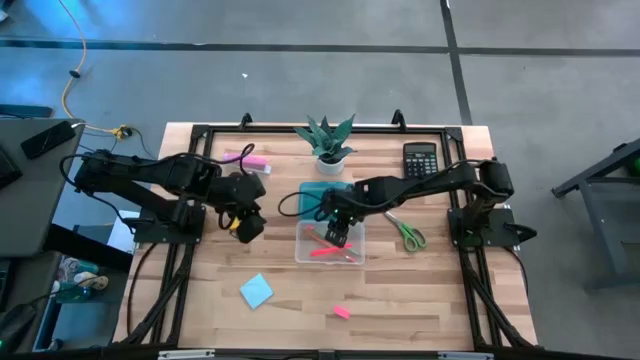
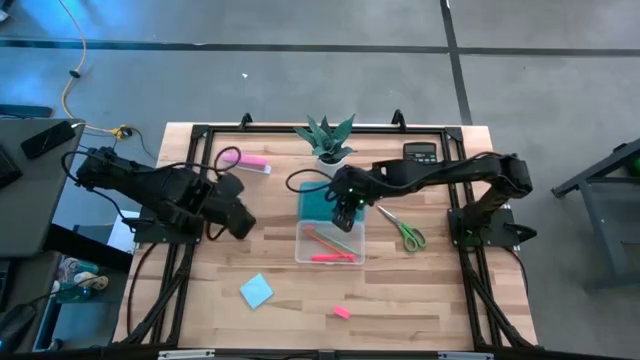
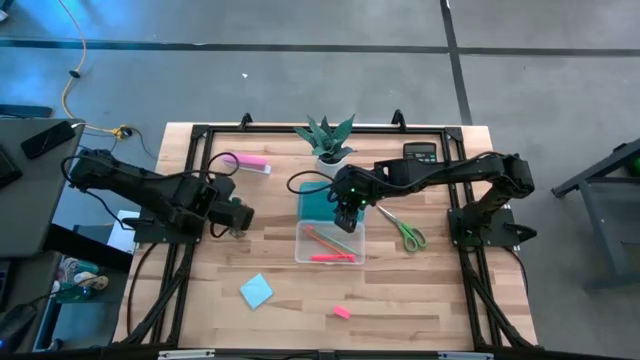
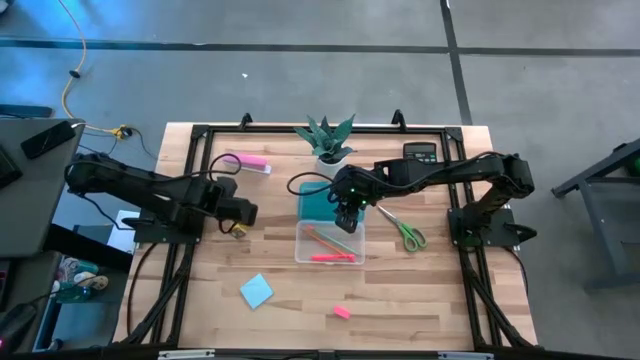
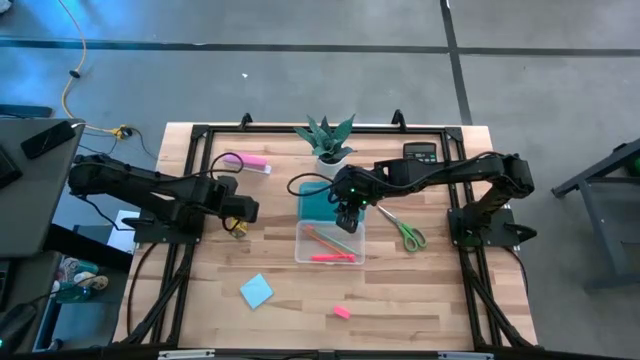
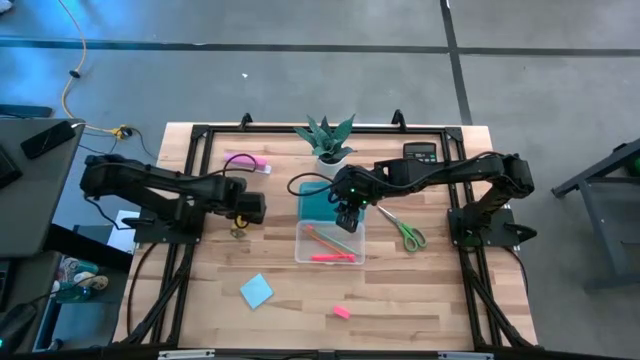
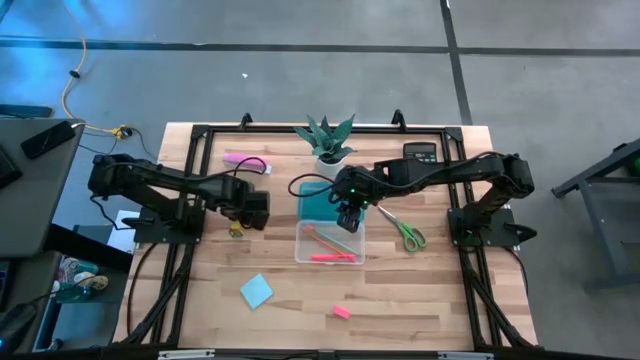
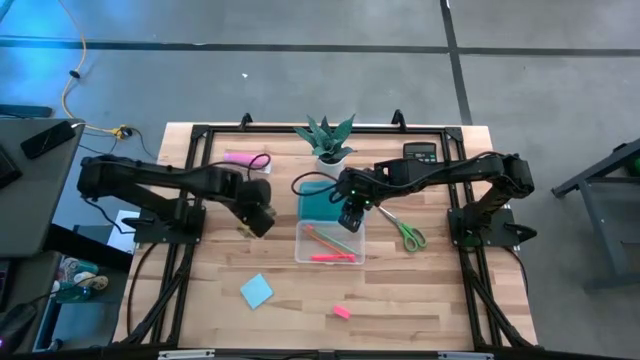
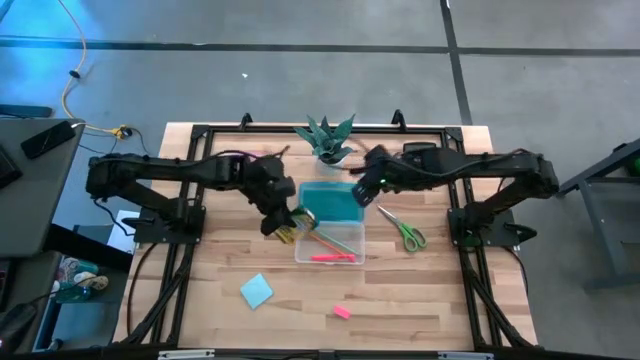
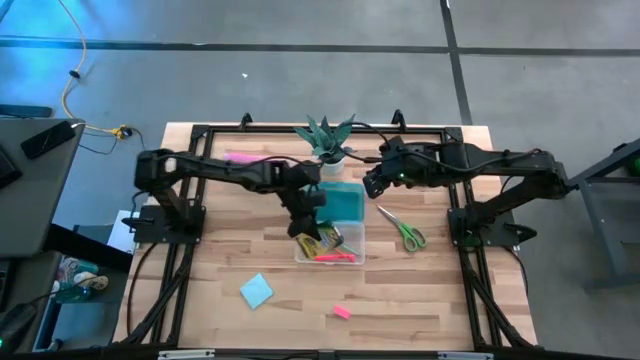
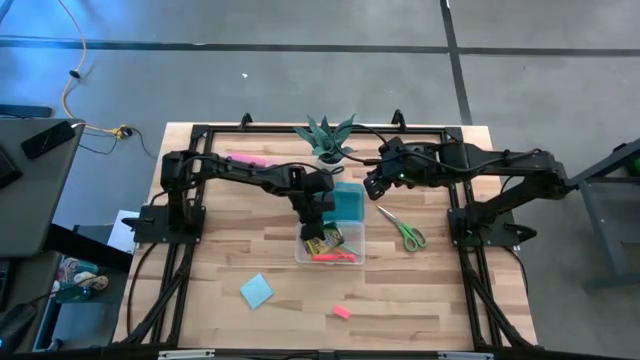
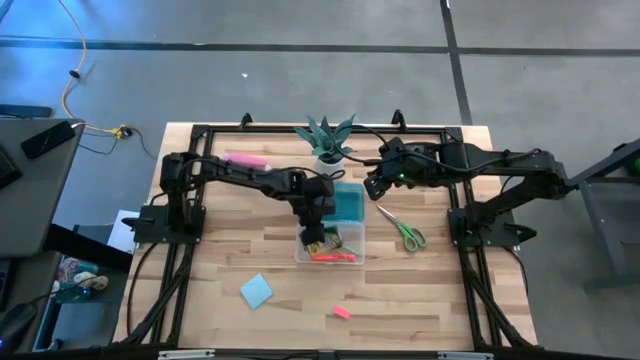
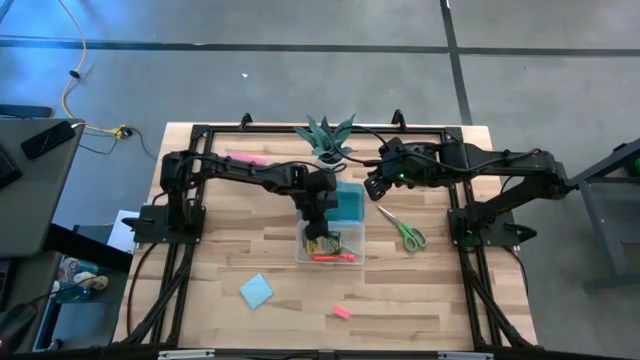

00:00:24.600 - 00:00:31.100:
Task: Pack school essentials
Put the yellow crayon box into the supply box

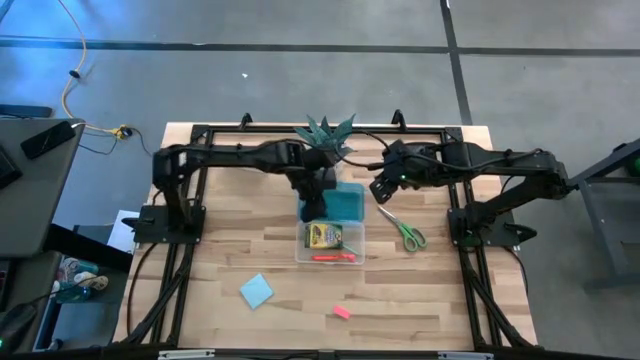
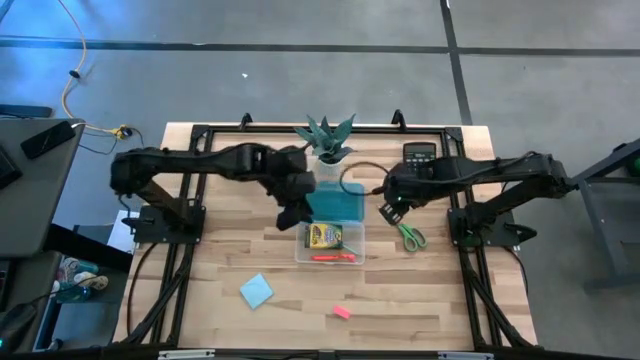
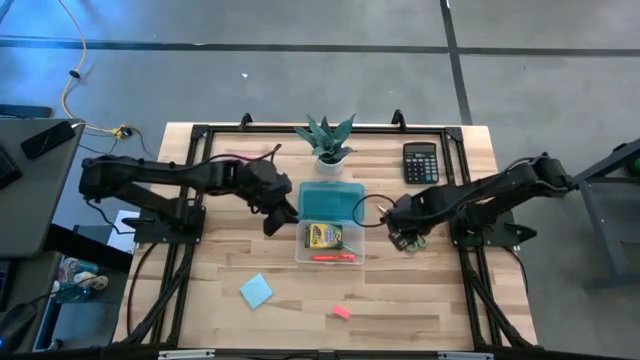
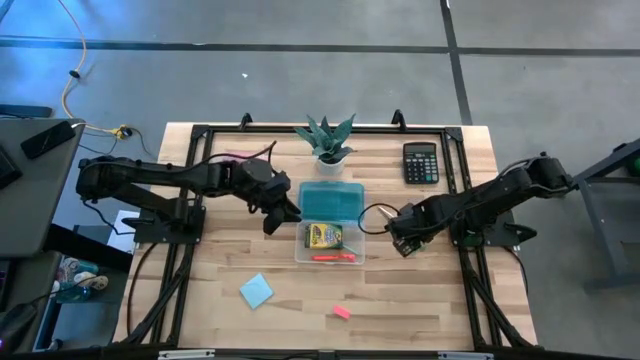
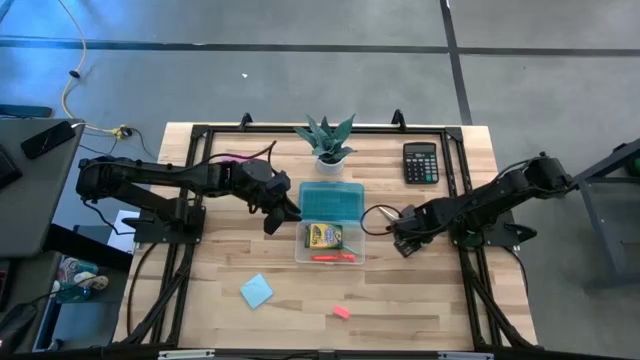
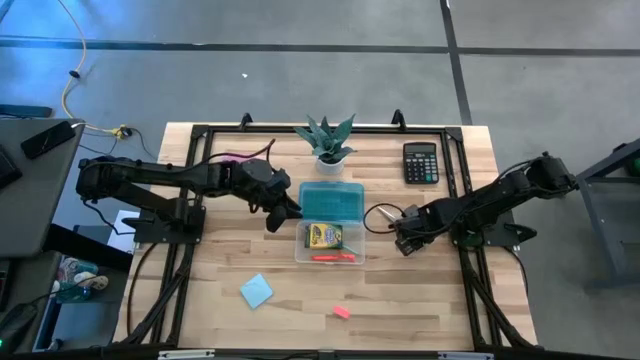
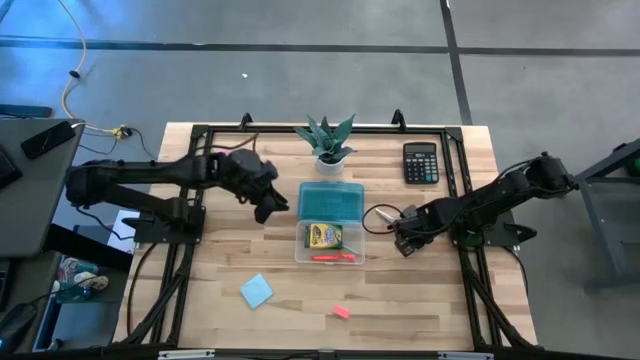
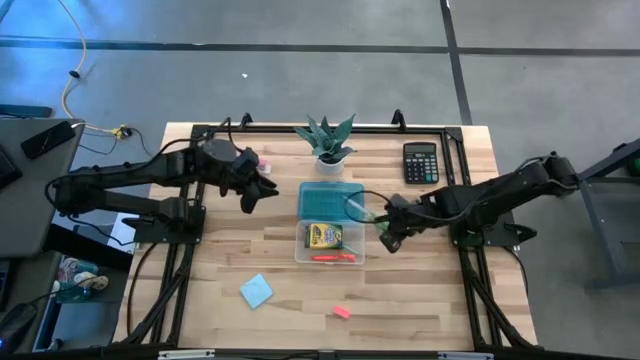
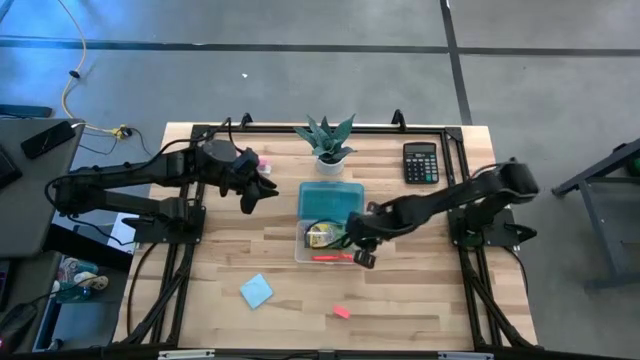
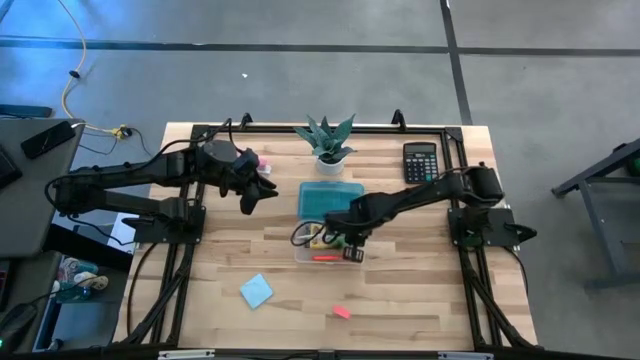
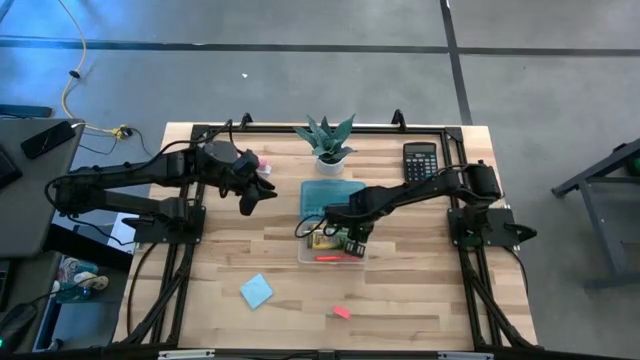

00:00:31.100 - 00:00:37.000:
Put the green scissors into the supply box

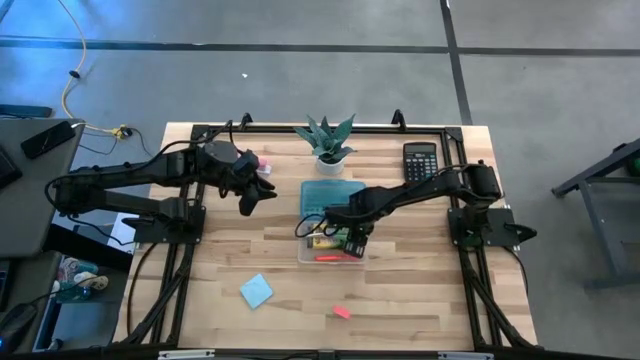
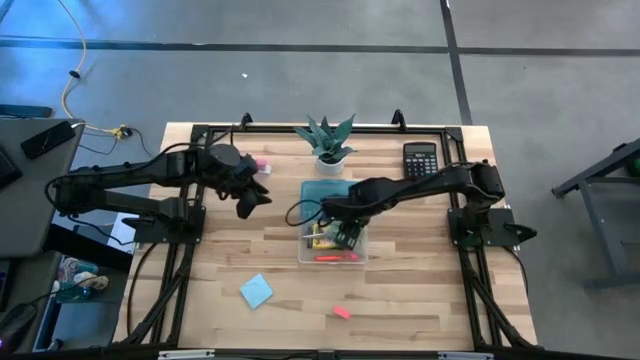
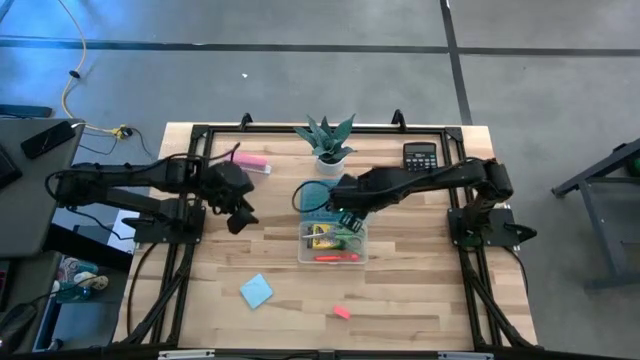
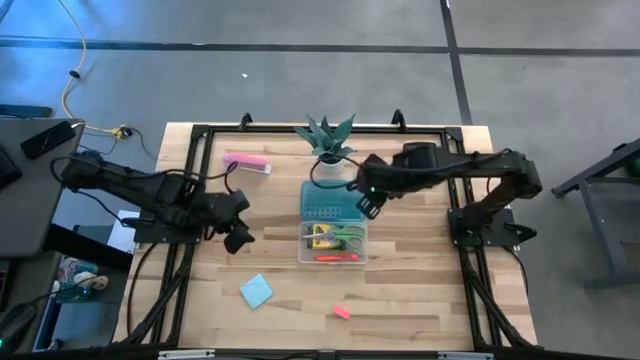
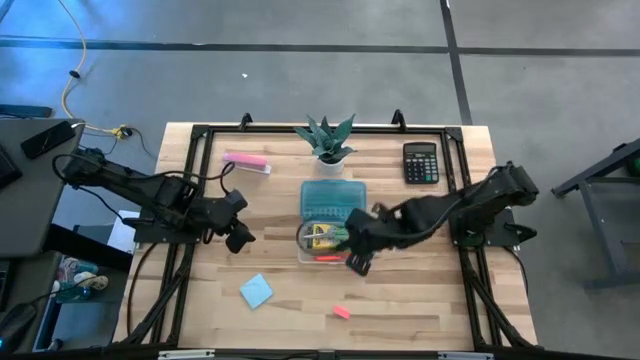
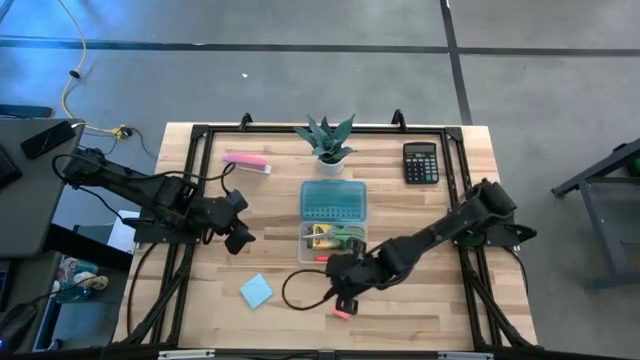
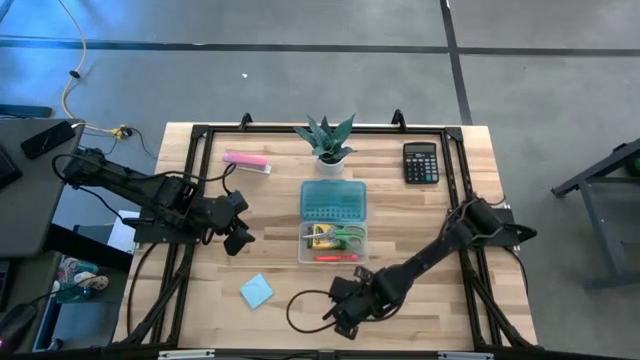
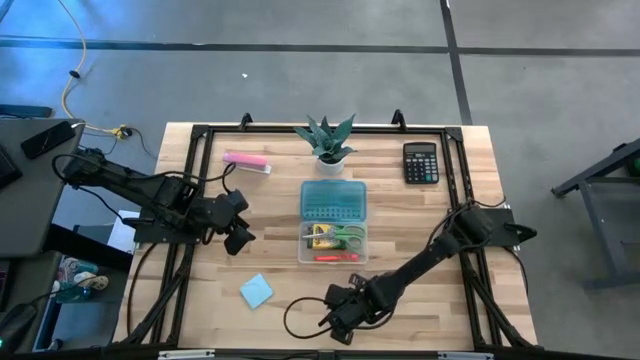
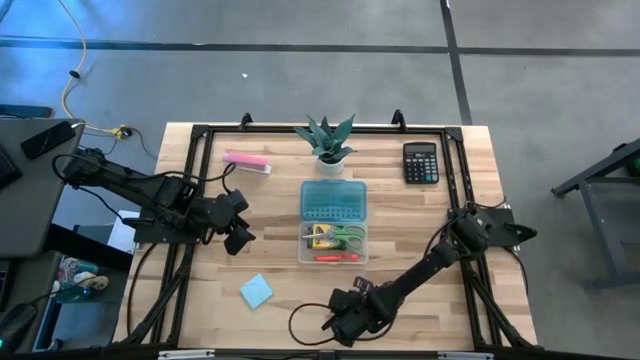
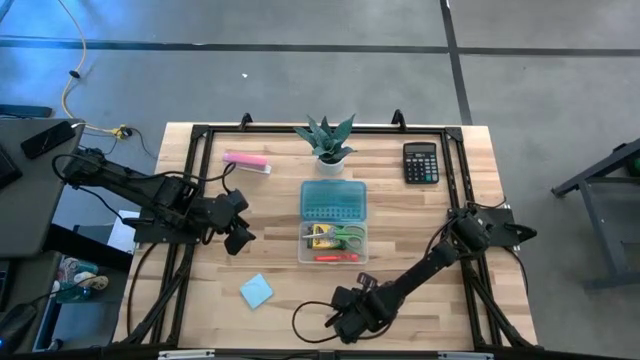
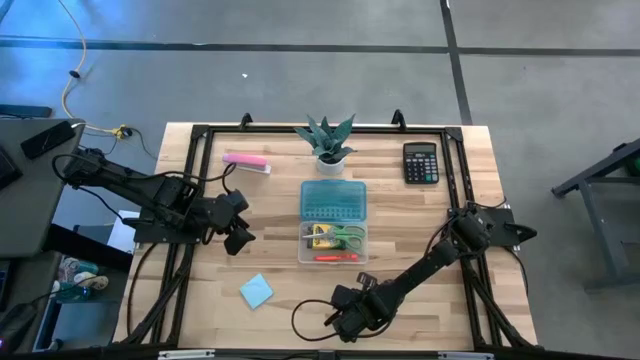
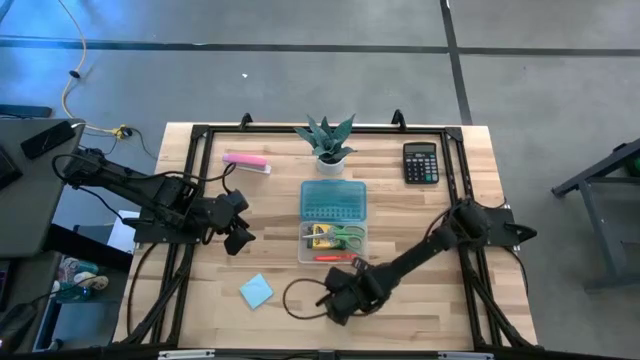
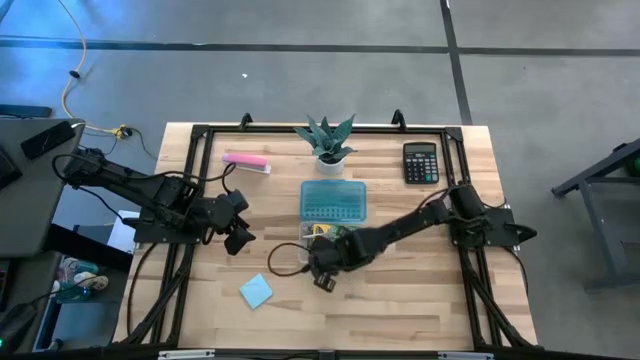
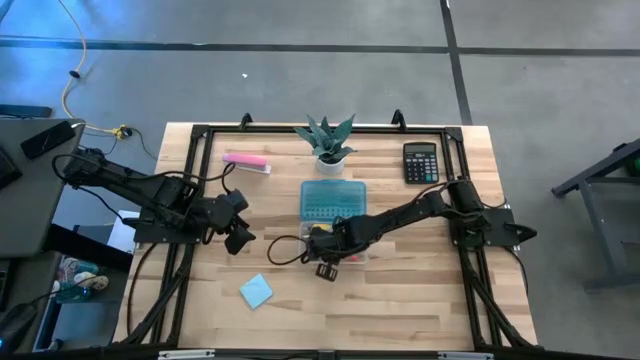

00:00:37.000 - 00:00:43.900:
Put the pink eraser into the supply box

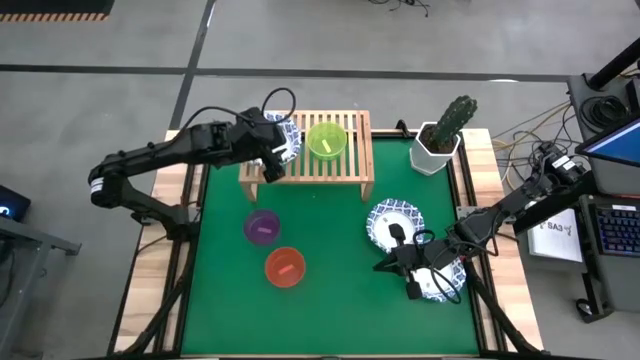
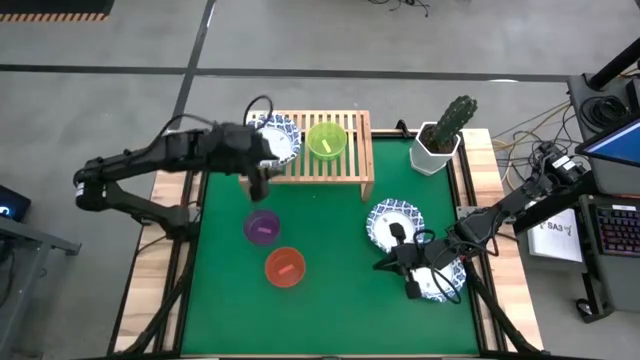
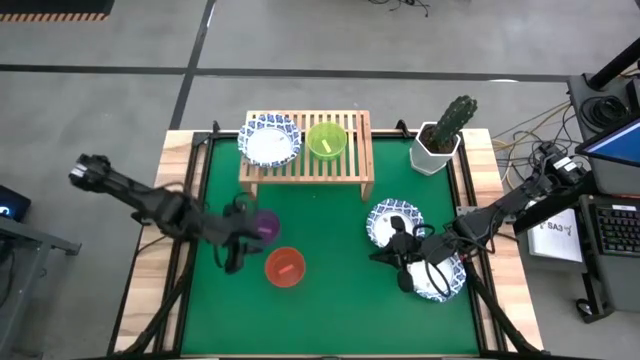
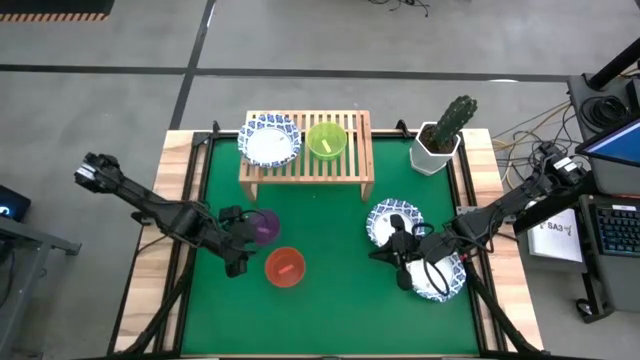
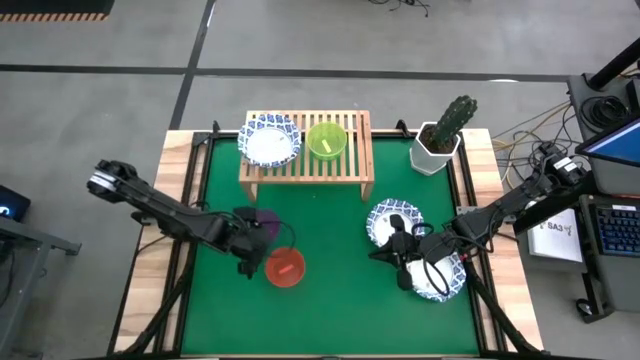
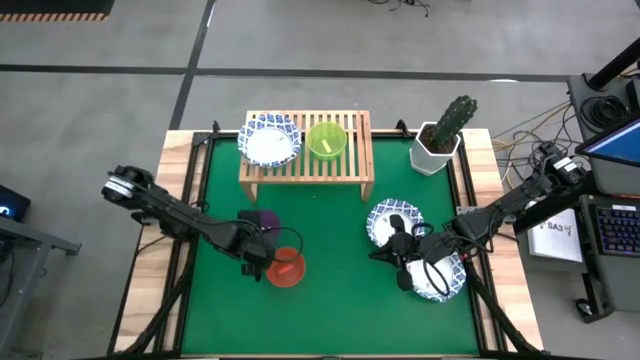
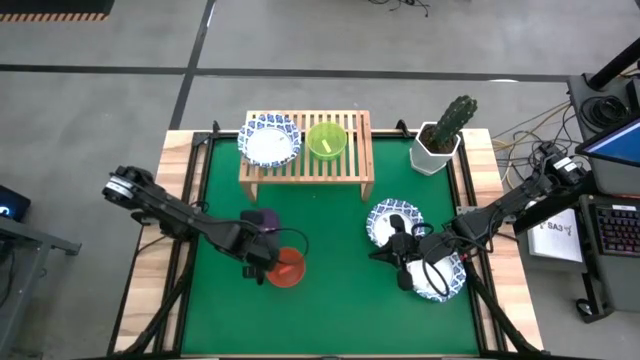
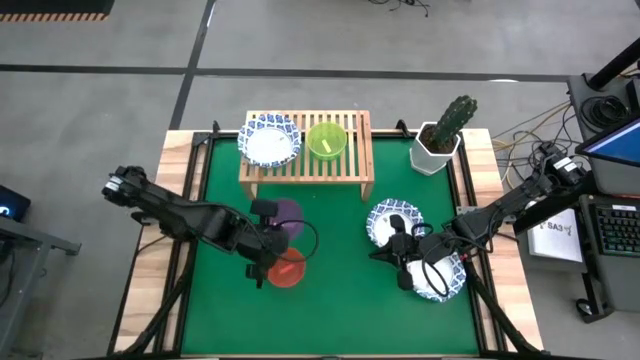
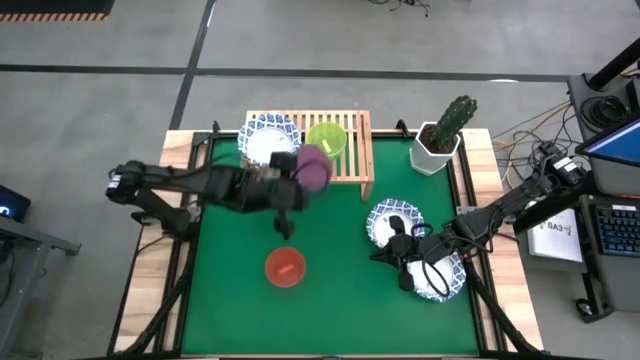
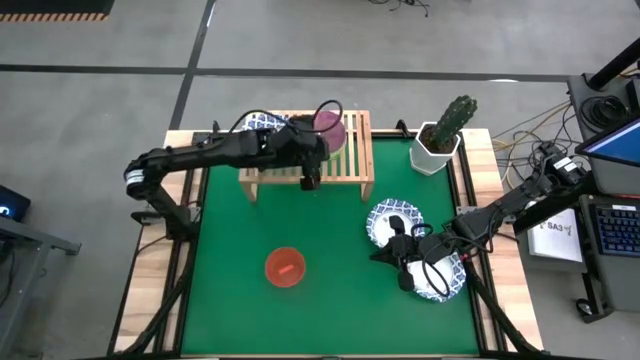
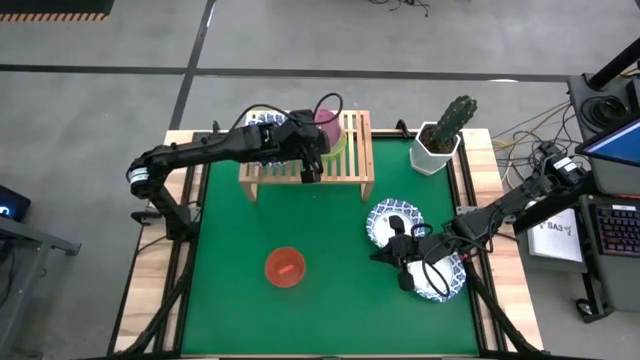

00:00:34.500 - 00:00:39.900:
Task: Place and stack bowls onto a shelf
Stack the small purple bowl on top of the small yellow bowl on the shelf
